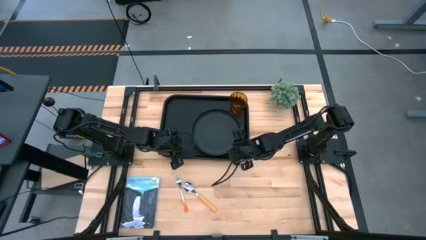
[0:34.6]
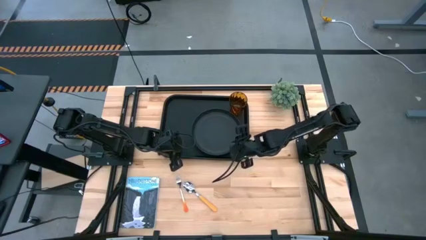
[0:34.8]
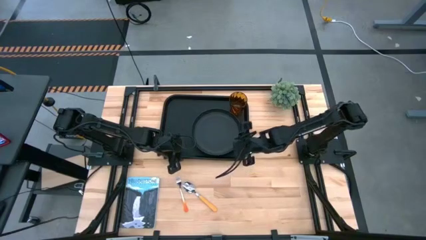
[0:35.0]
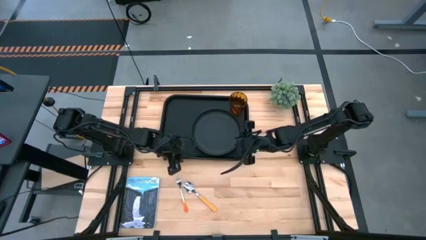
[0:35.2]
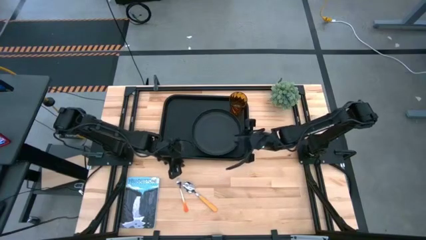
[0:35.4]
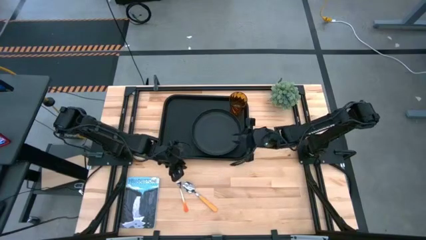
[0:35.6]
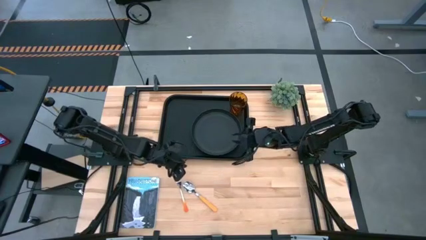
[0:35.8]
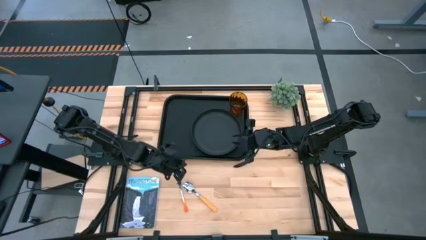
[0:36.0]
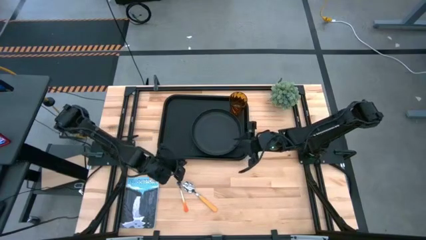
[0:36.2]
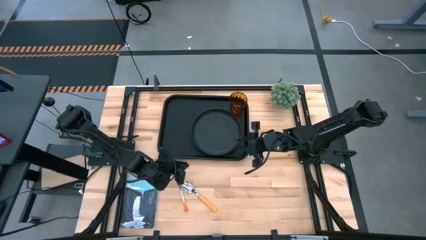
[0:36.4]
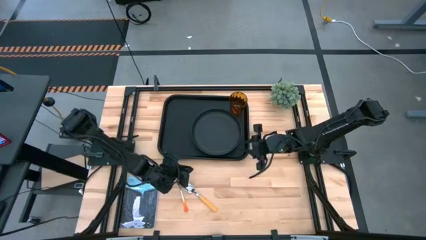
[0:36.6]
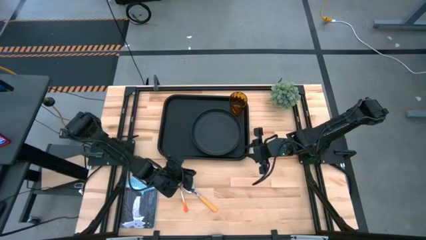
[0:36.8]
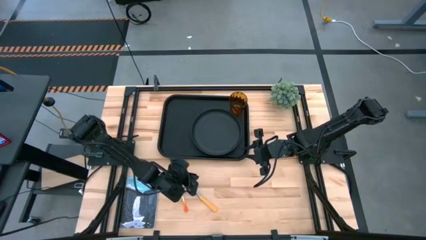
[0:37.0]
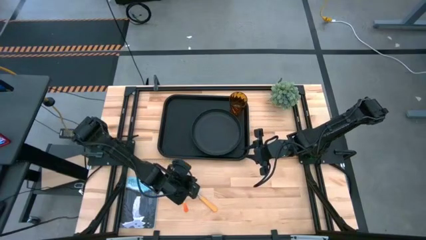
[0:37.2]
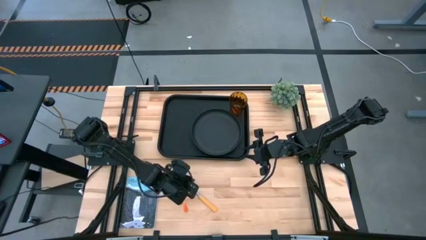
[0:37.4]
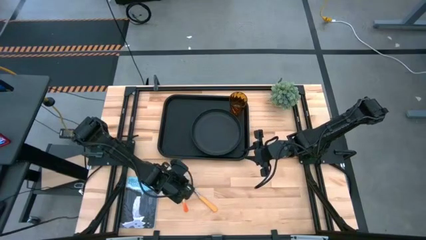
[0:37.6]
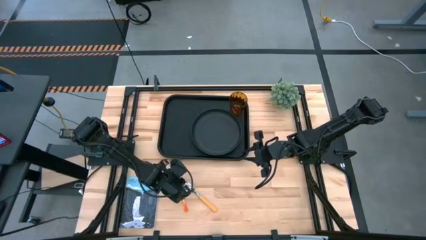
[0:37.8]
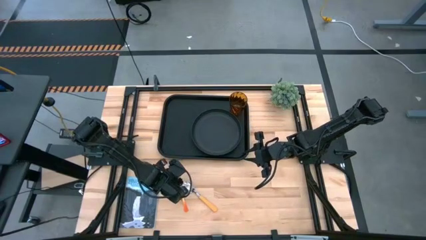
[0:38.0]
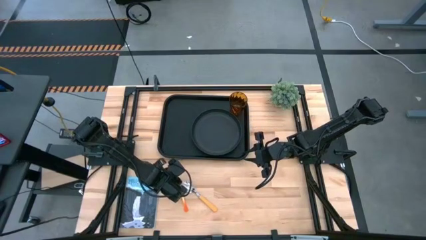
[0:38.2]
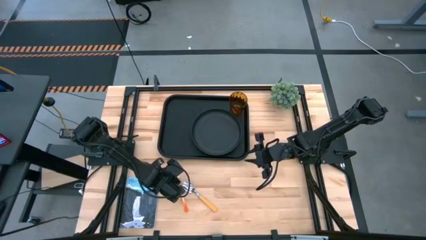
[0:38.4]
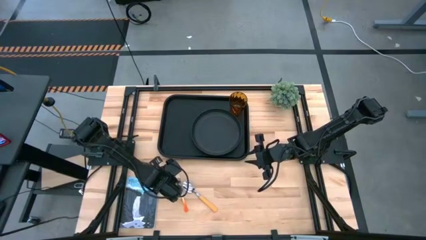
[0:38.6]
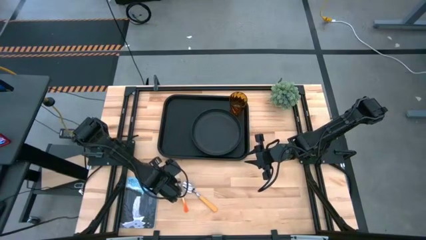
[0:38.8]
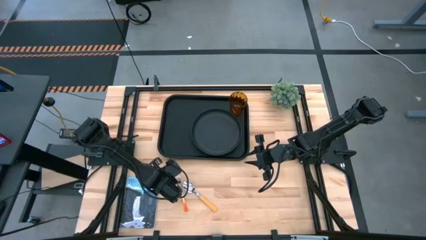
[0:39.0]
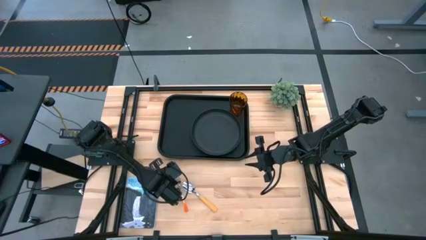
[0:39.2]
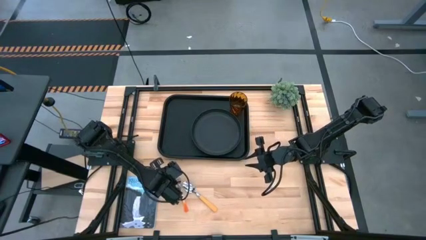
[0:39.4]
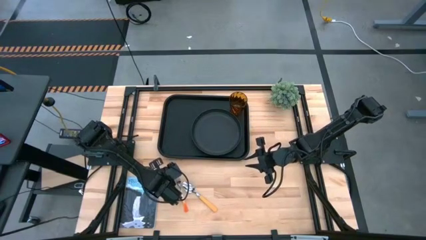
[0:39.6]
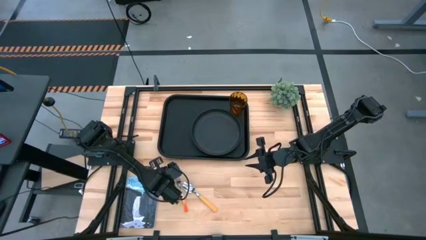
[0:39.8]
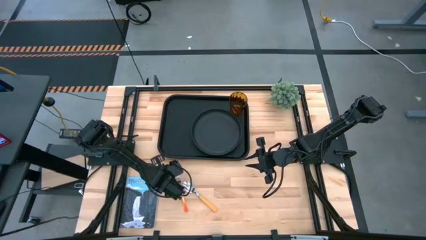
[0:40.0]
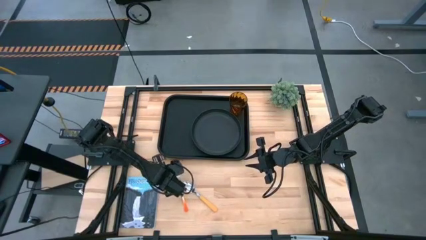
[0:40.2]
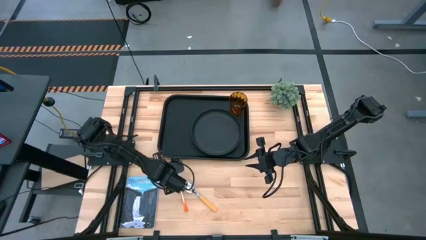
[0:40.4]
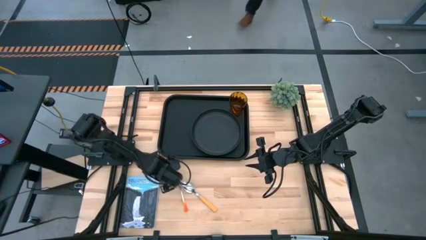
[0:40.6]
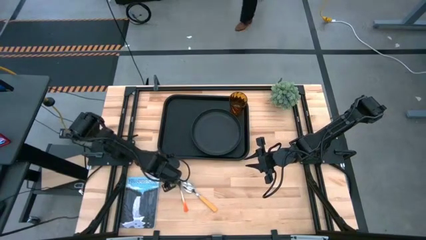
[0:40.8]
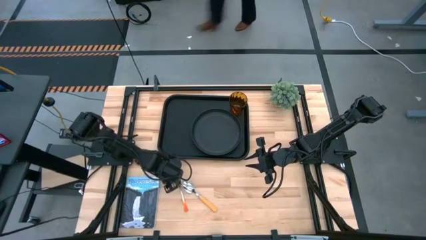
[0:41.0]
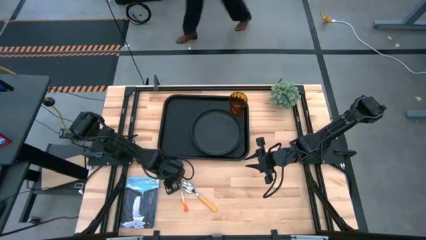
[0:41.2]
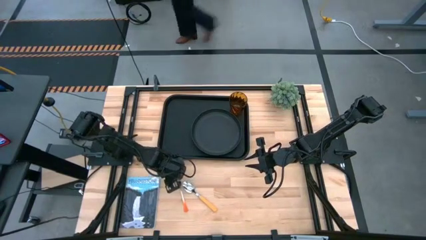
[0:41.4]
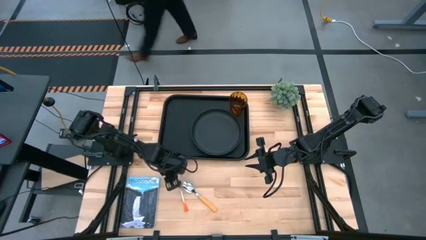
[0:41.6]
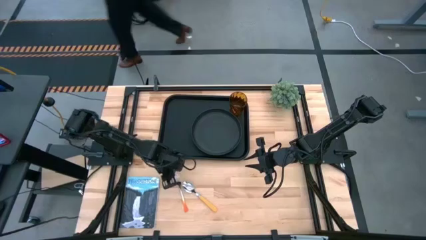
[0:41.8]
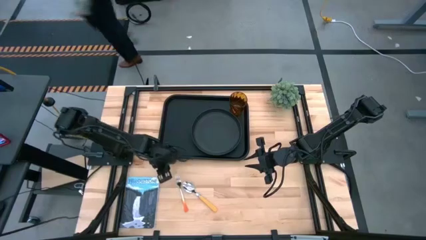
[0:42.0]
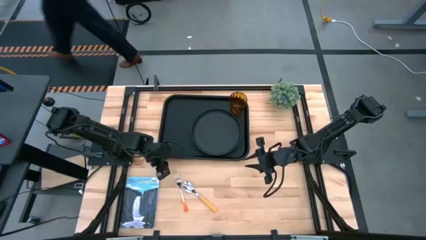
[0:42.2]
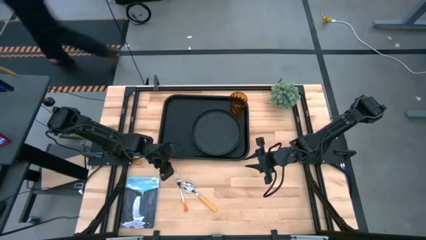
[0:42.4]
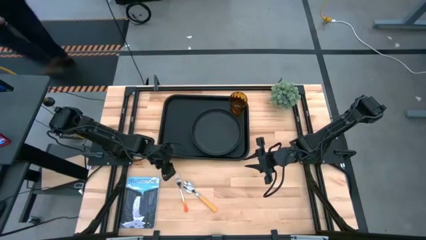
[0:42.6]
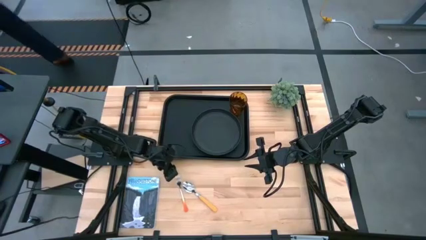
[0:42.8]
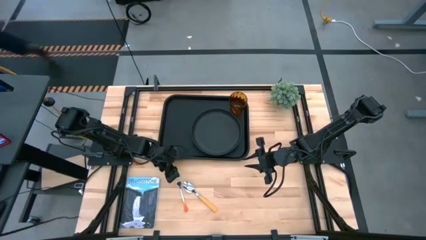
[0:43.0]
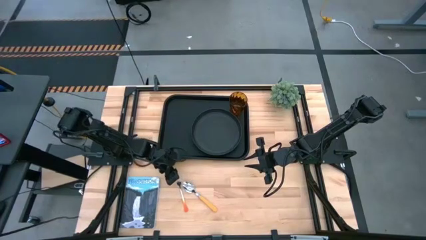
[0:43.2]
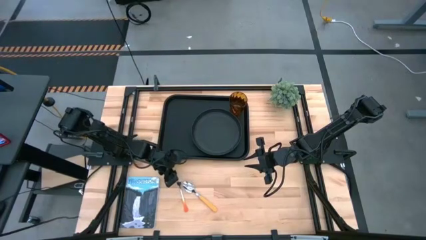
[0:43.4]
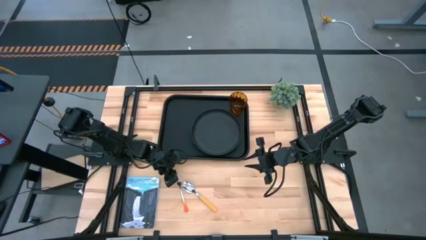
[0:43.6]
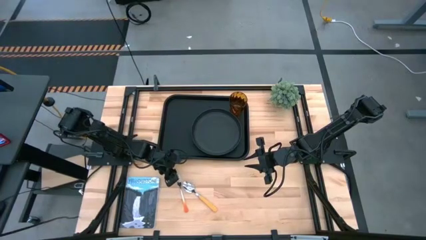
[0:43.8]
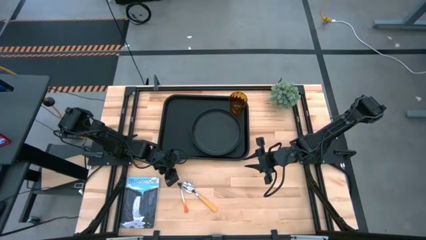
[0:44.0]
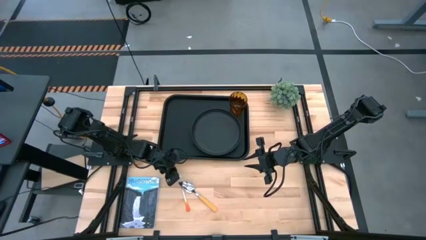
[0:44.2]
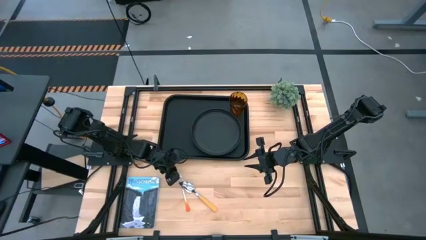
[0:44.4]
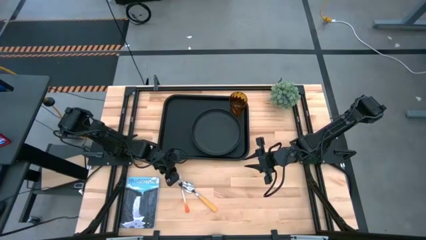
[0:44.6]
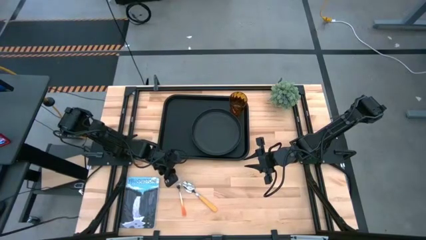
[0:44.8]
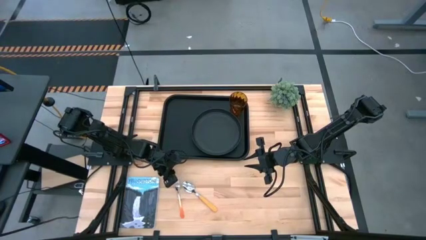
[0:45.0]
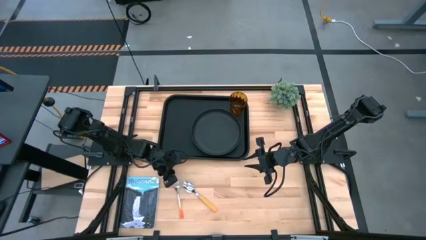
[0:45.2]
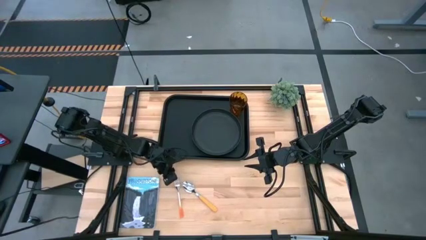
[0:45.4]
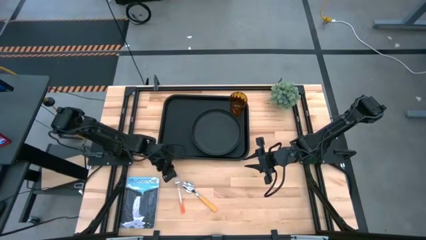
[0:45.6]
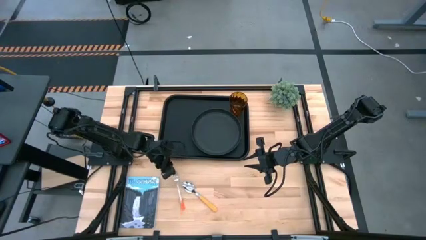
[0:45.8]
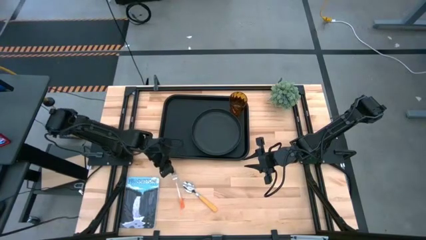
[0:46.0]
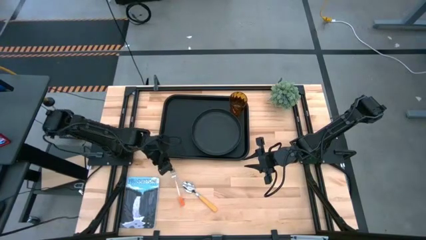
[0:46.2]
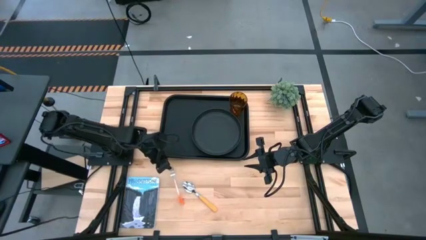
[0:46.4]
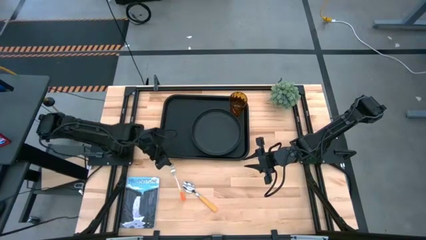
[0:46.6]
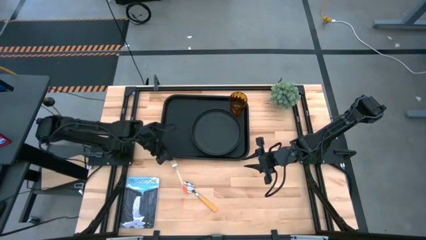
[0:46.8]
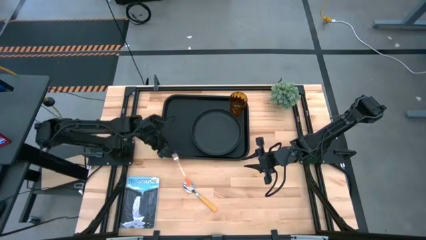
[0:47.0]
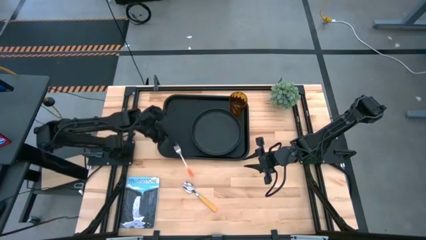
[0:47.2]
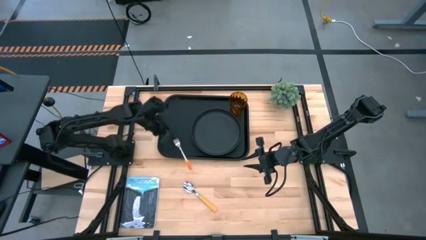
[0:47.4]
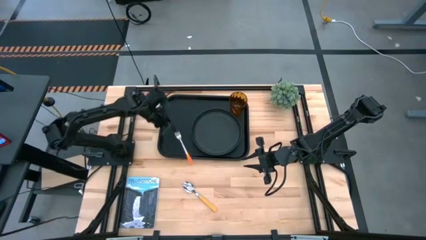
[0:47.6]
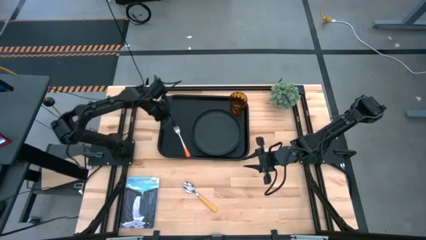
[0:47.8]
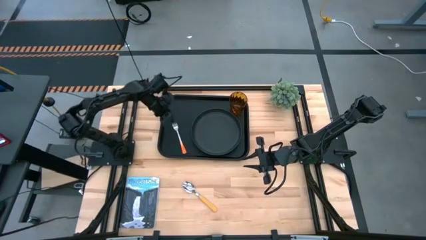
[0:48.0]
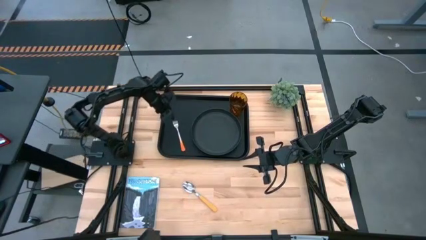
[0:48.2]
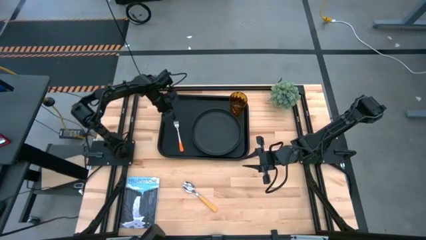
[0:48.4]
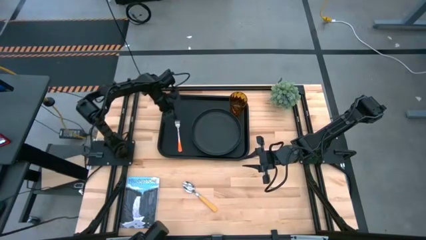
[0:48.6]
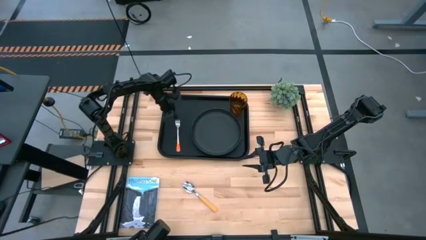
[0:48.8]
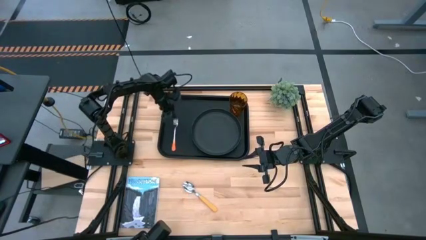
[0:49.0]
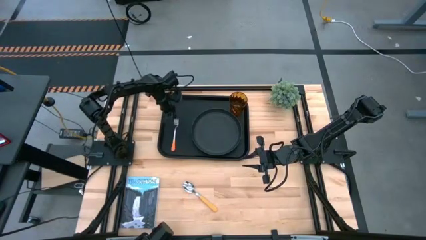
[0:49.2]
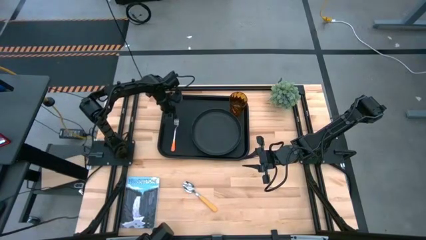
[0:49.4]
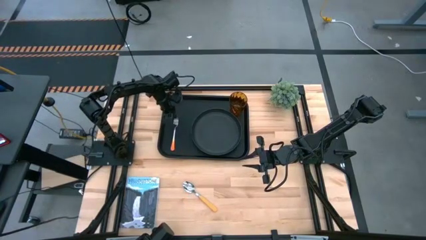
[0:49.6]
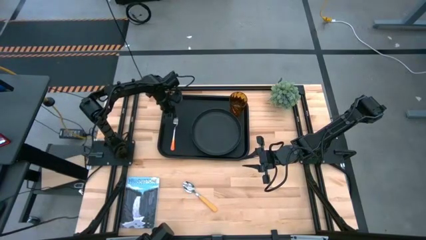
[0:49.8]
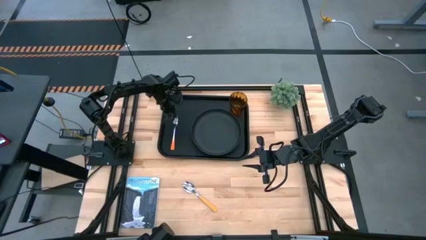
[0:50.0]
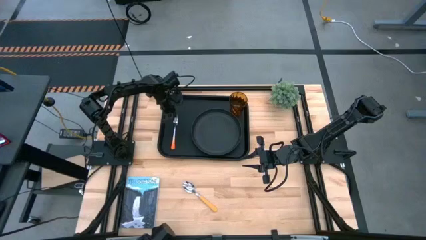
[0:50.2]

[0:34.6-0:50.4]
Task: Pick and place plate/cup/fork/spoon on tray
Put the orange fork on the black serving tray

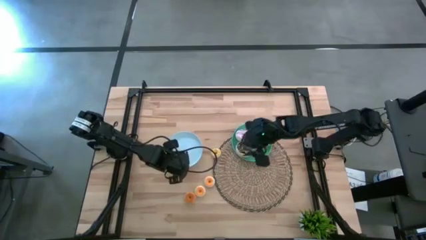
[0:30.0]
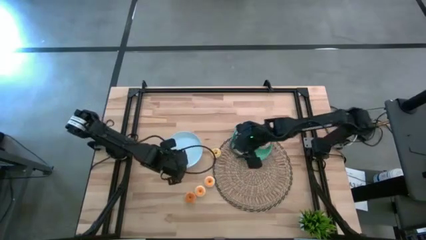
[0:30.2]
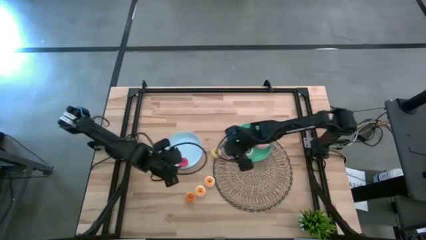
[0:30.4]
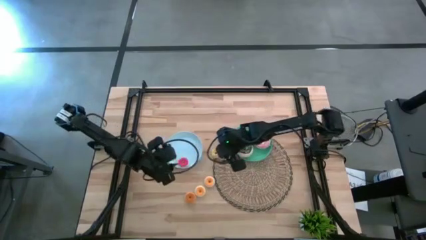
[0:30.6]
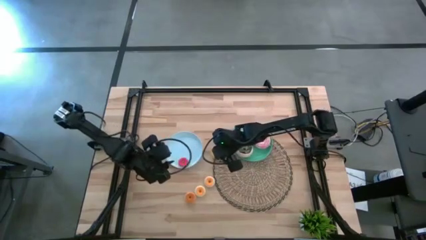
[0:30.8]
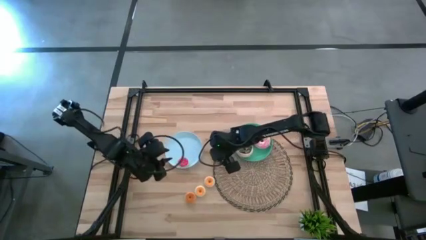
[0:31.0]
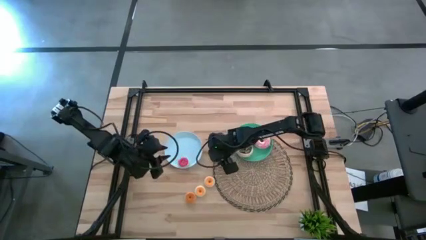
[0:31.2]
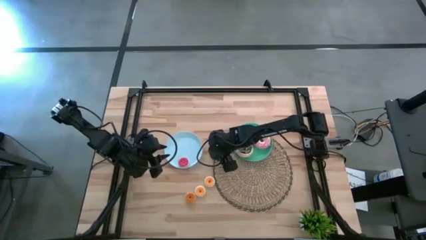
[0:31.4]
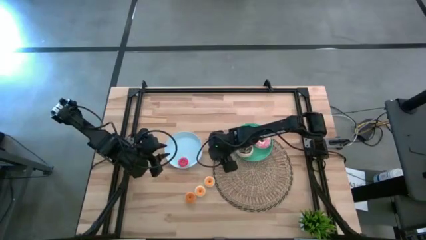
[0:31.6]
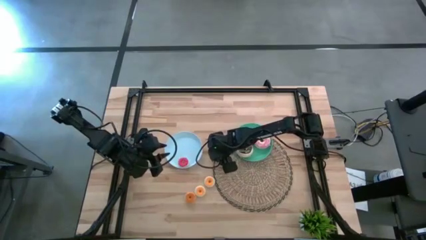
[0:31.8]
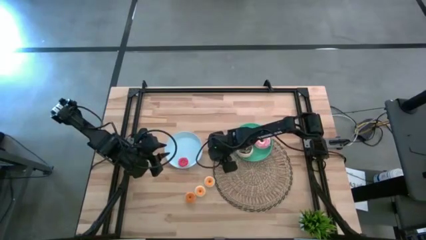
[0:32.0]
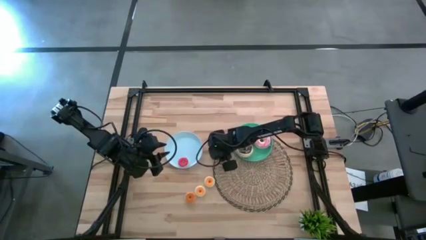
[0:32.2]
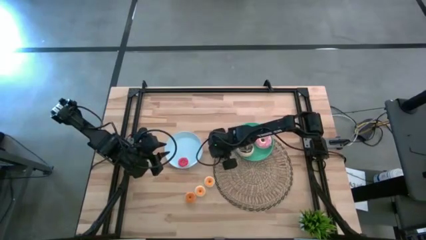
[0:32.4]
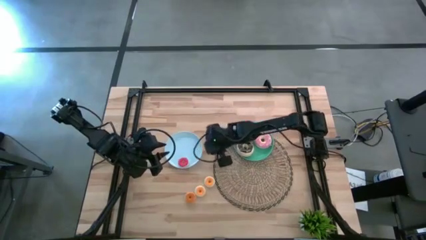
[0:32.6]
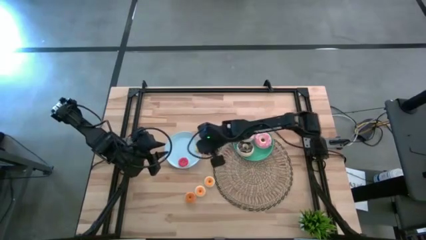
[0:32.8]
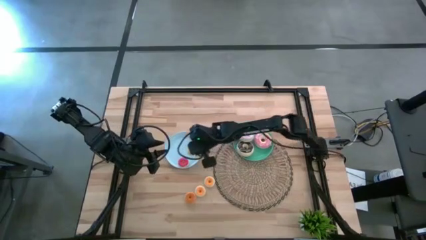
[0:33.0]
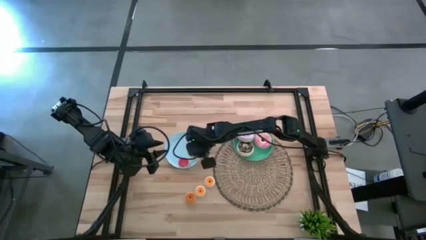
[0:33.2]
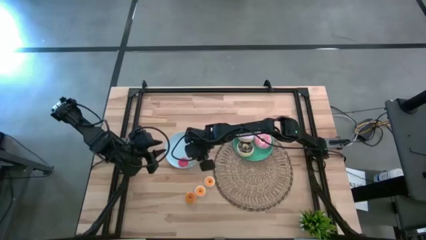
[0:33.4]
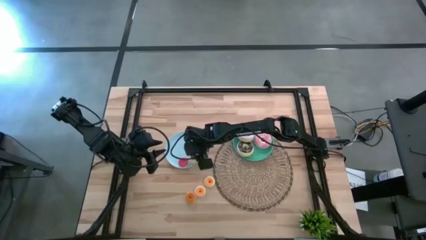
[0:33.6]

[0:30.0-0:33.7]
Task: Pick & Place donuts
Put the yellow doughnut on the blue plate
